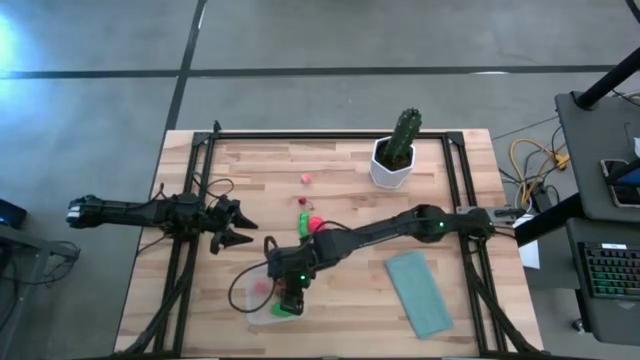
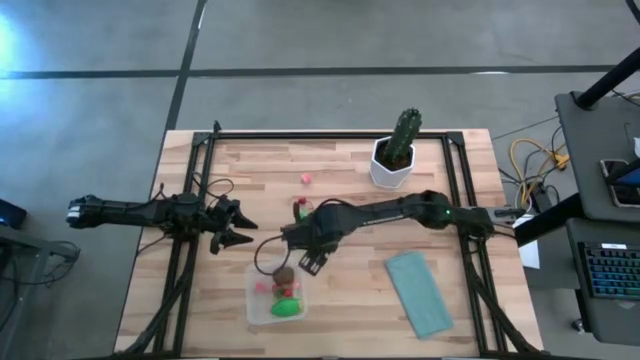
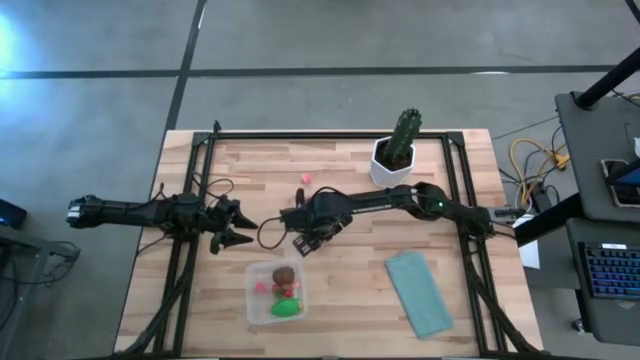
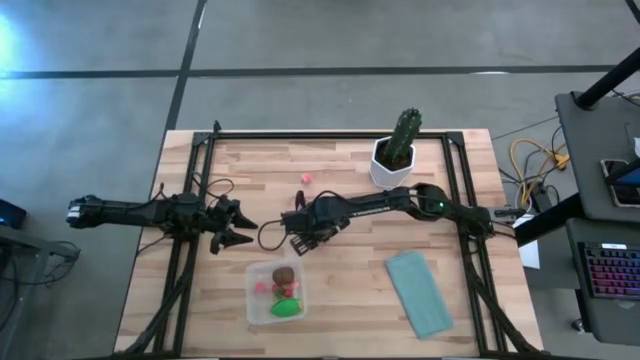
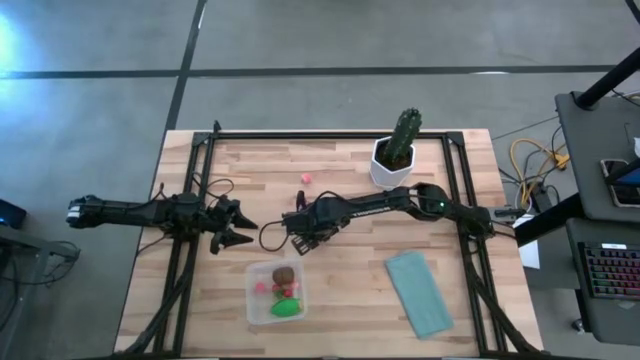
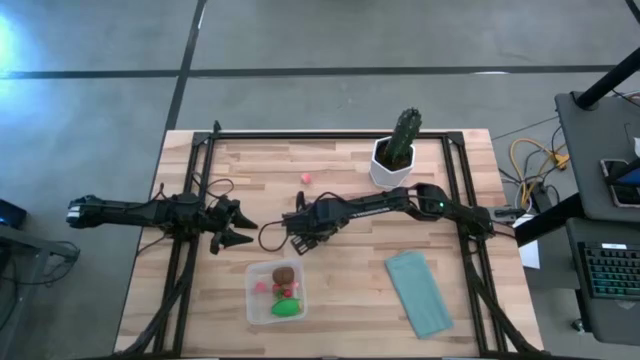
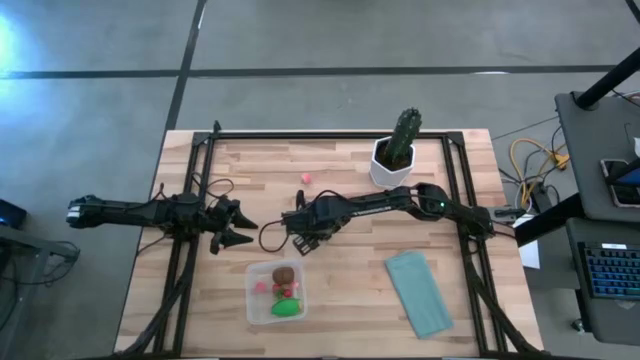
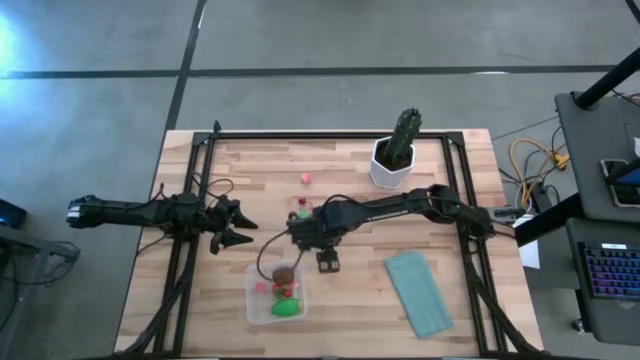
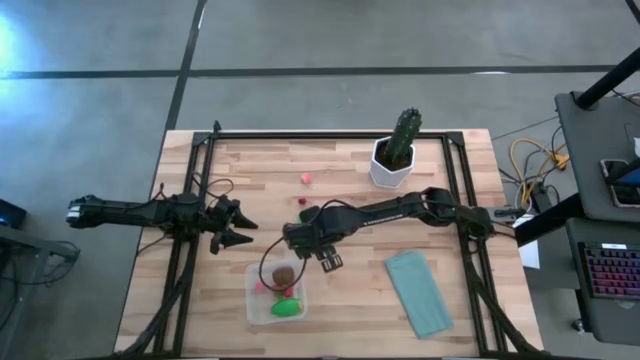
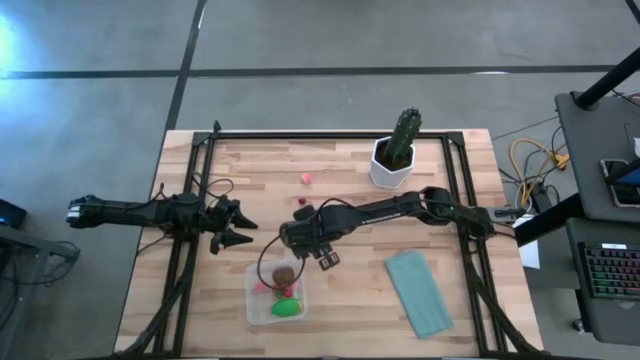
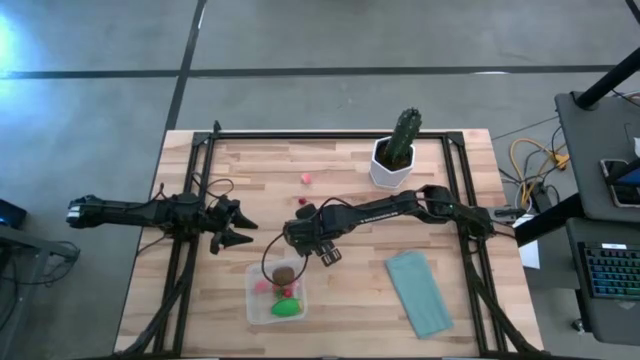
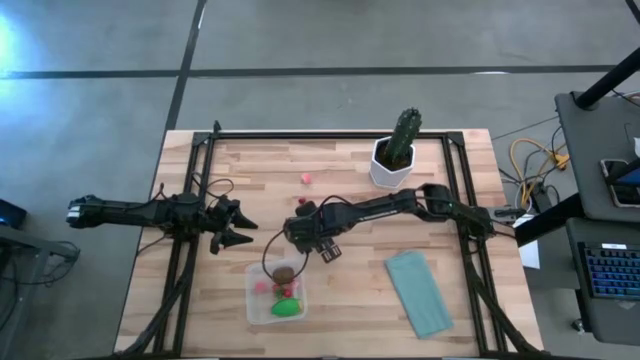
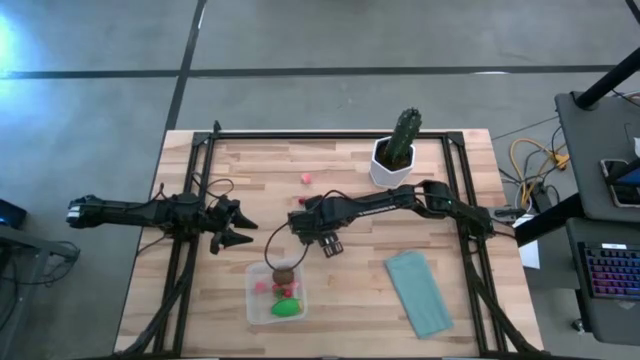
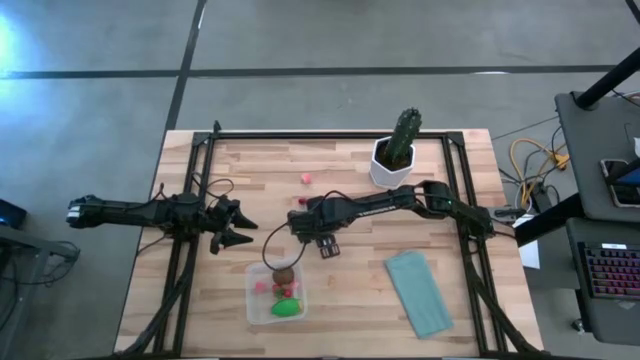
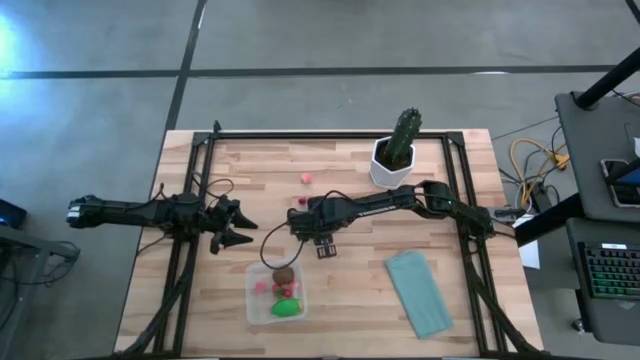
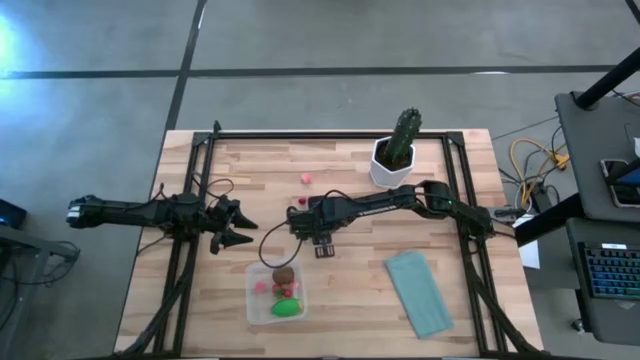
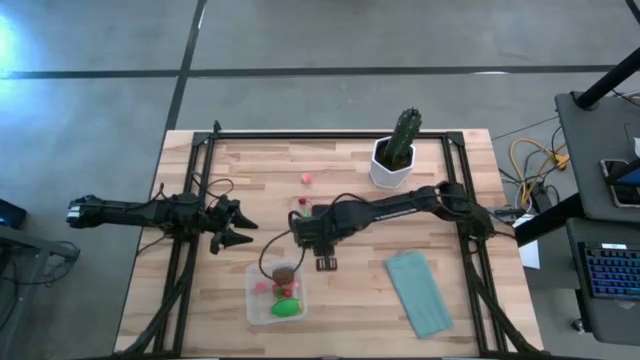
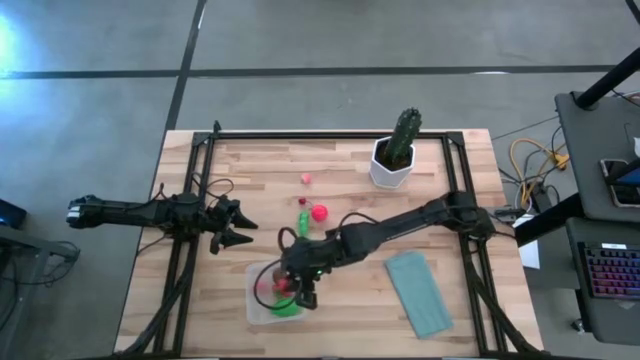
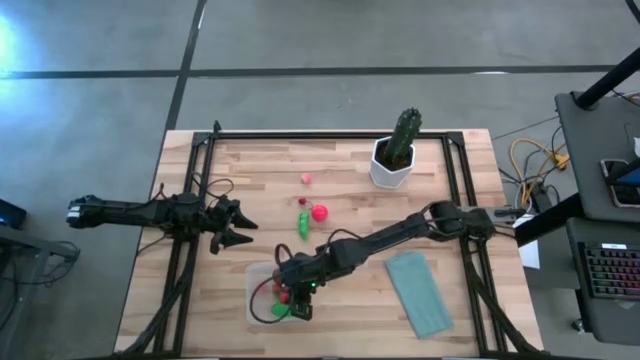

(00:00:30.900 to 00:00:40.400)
Task: Pick and placing Produce into tupperware
Put the red strawberry into the transparent bin

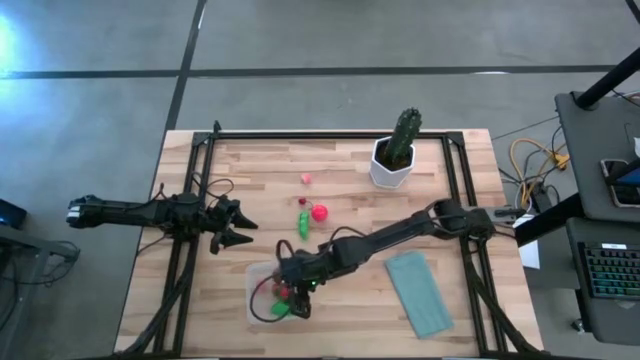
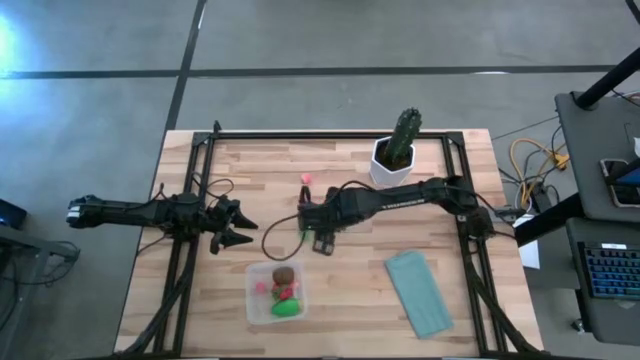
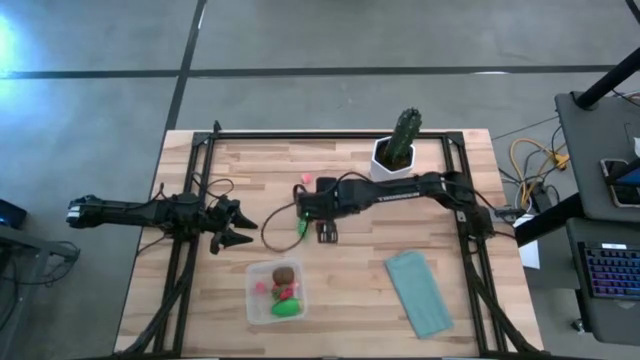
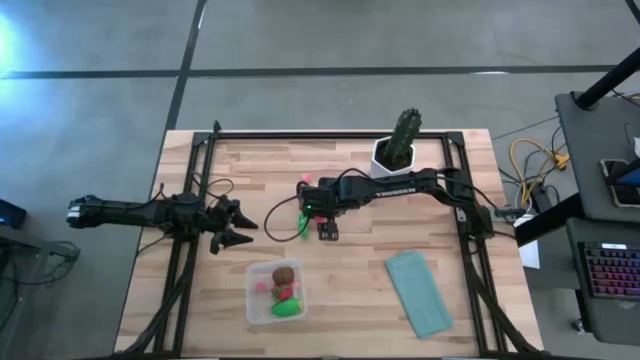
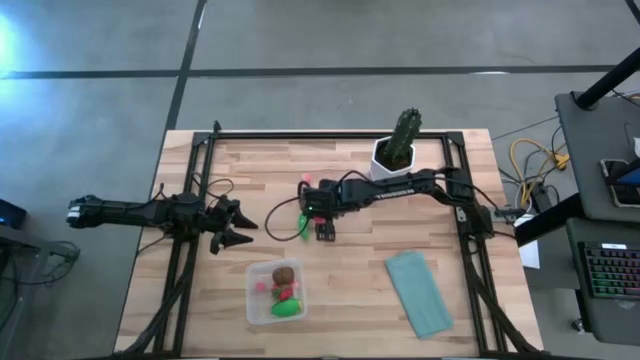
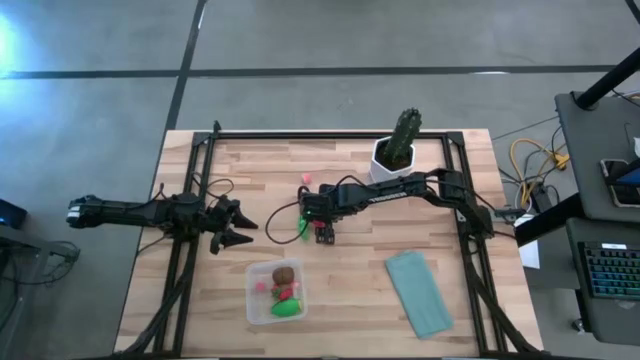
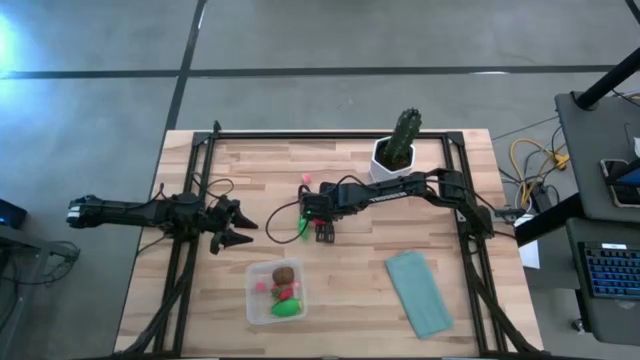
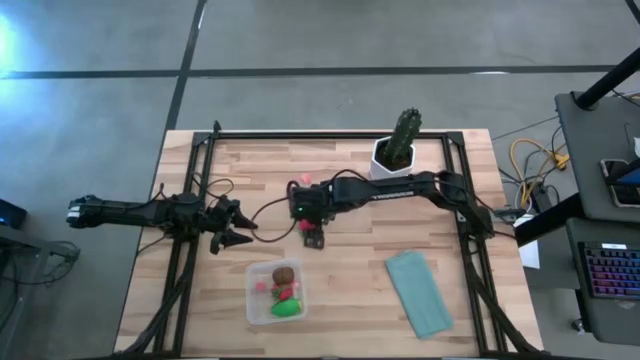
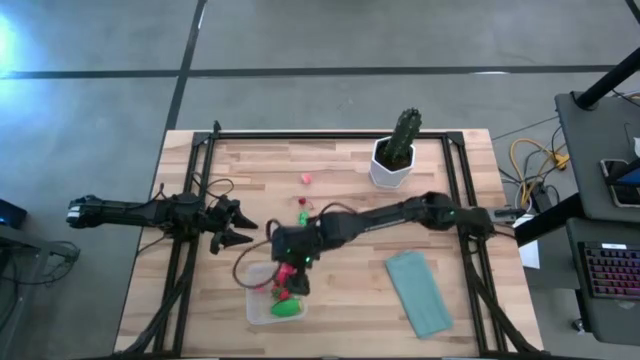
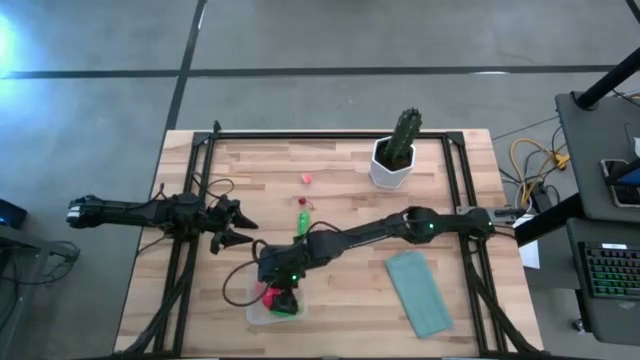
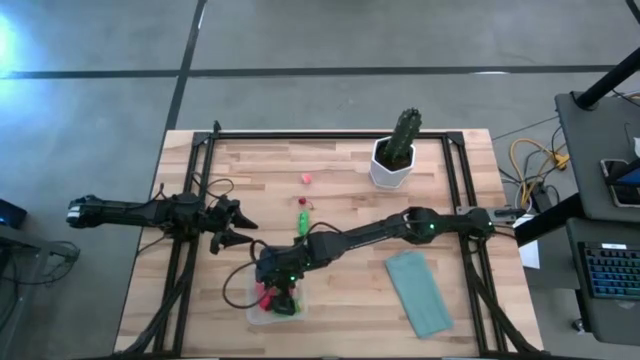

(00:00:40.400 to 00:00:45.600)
Put the red tomato into the transparent bin

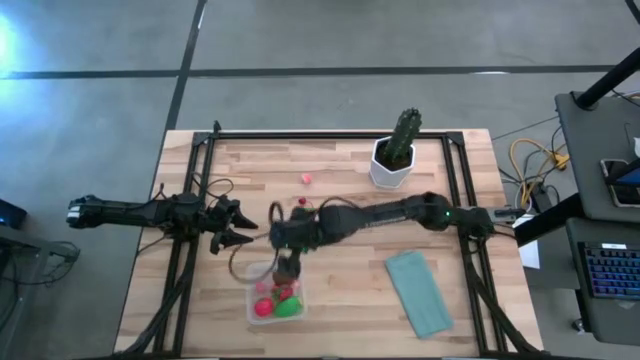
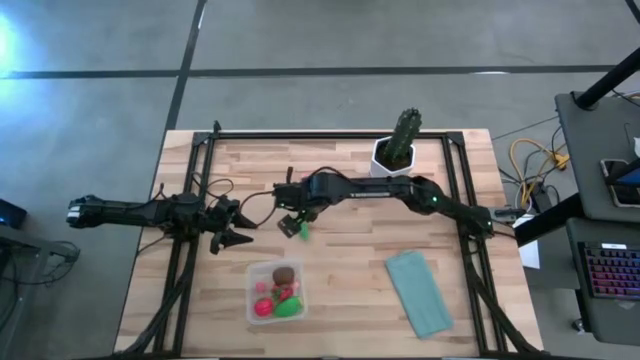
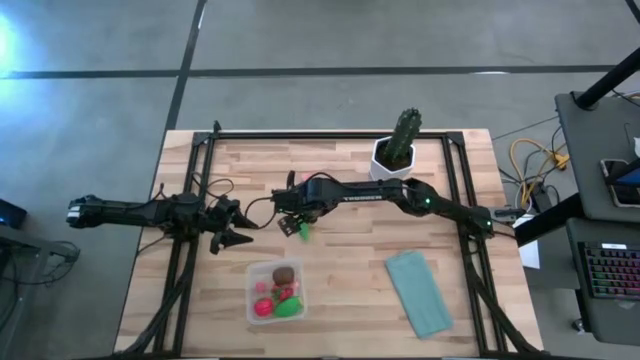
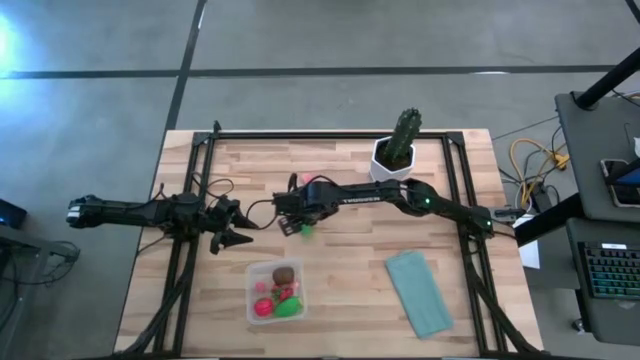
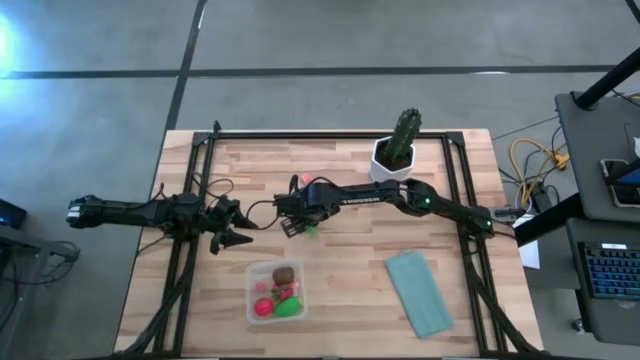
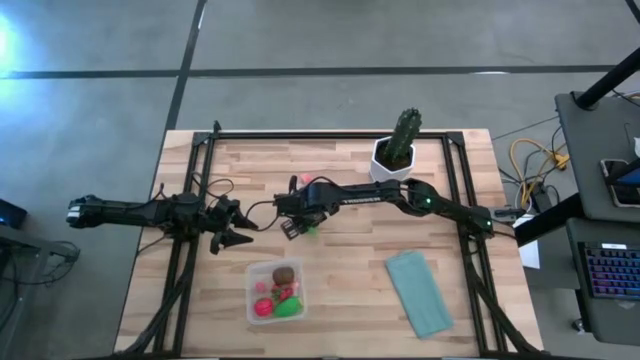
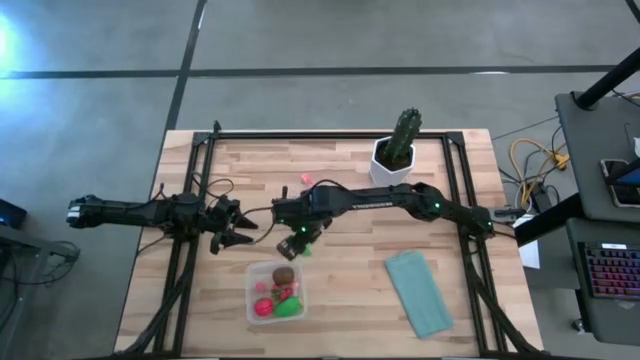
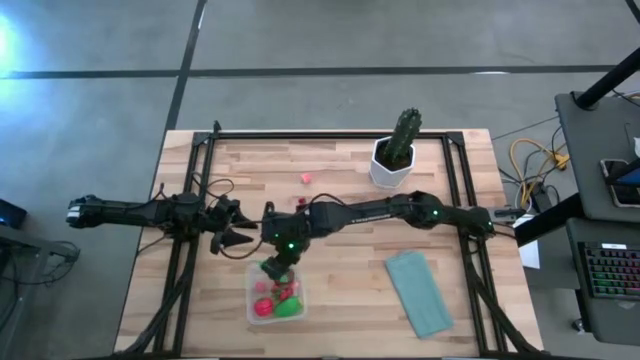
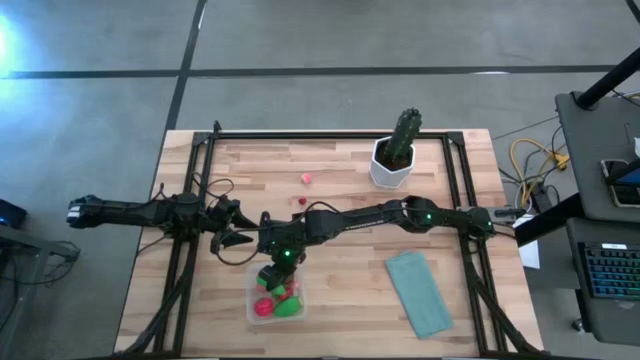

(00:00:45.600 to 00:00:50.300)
Put the green peas into the transparent bin

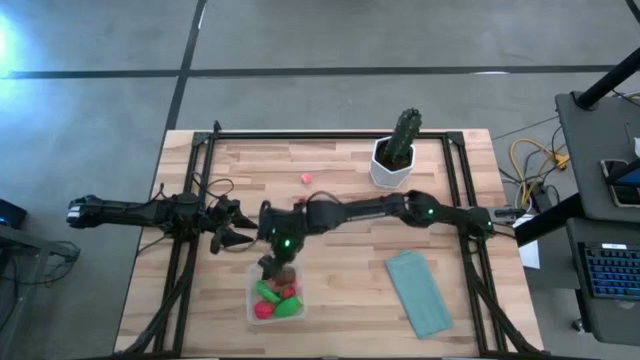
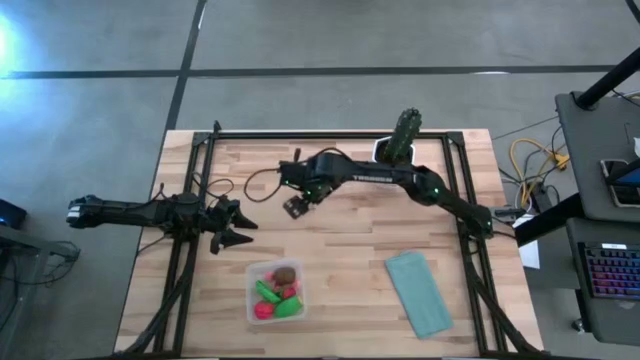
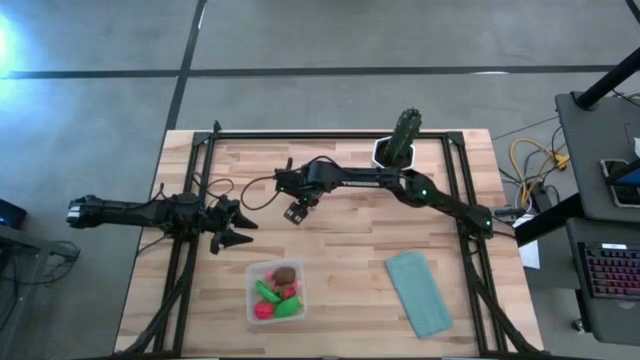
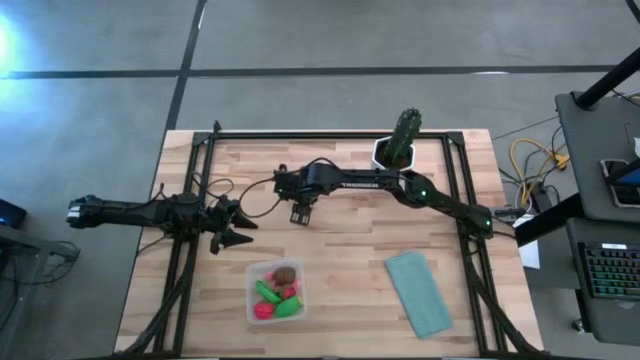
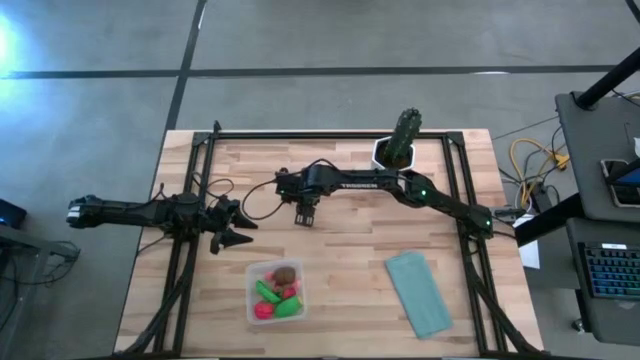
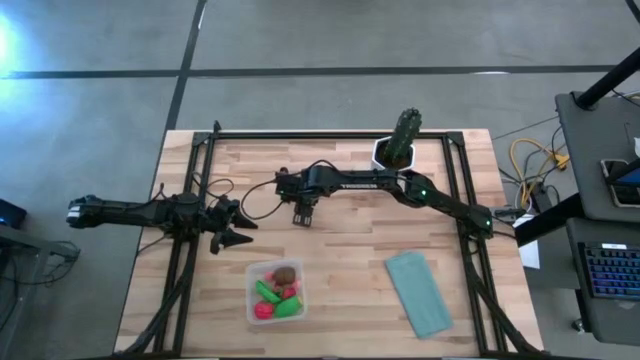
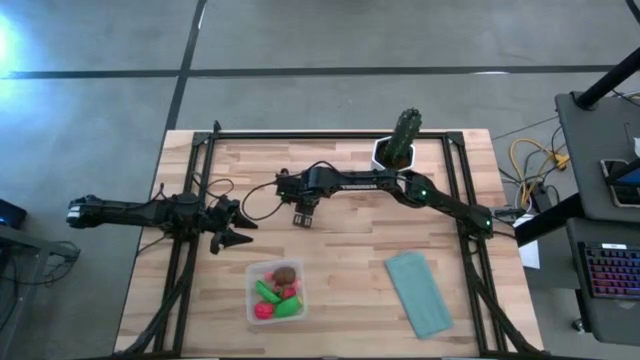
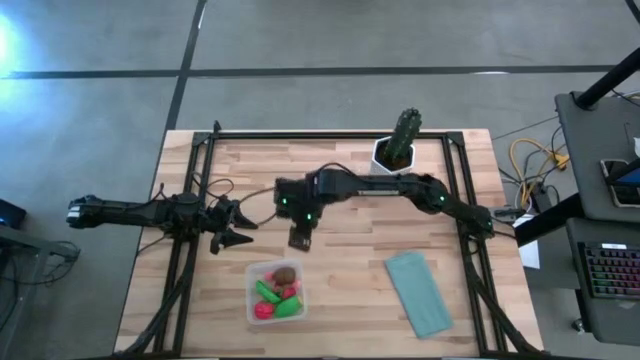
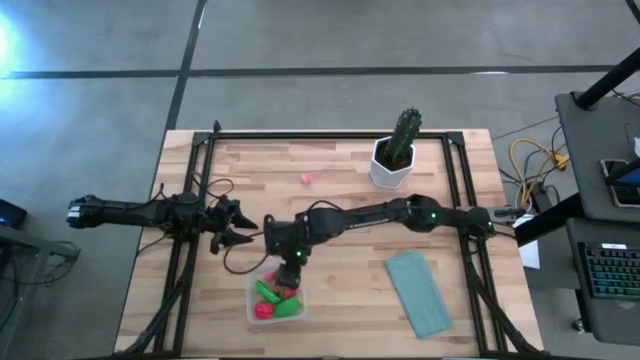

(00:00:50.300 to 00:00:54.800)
Put the red cherry into the transparent bin
